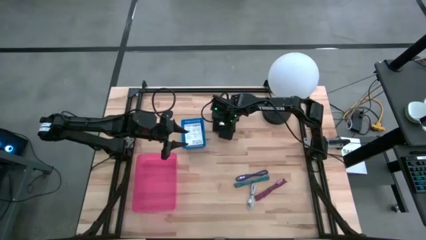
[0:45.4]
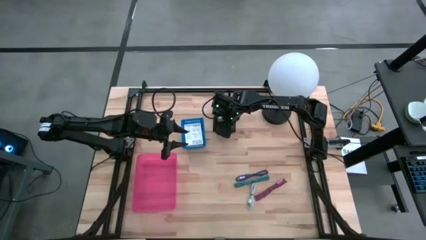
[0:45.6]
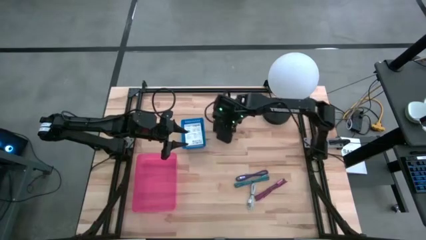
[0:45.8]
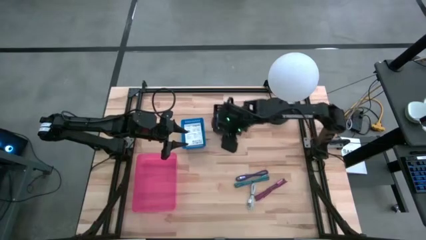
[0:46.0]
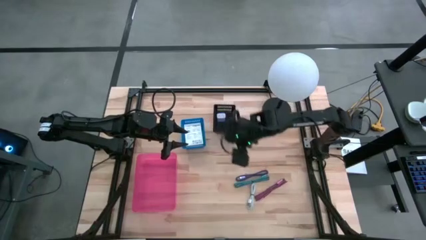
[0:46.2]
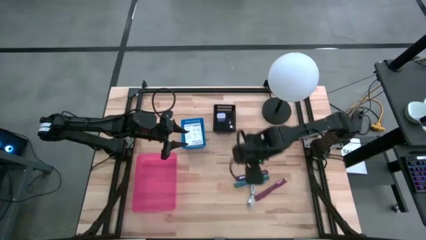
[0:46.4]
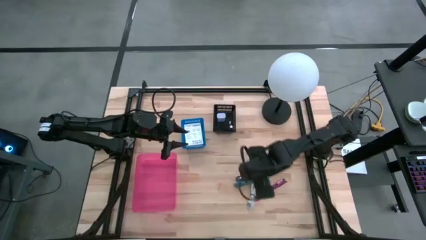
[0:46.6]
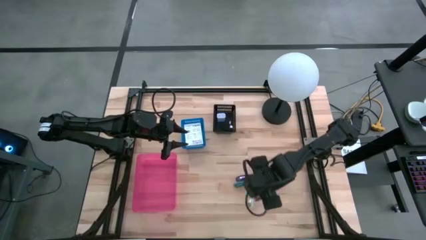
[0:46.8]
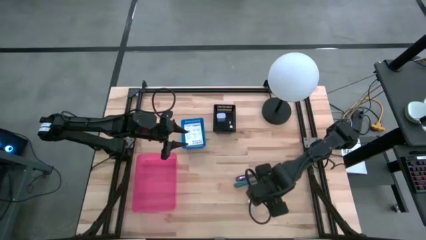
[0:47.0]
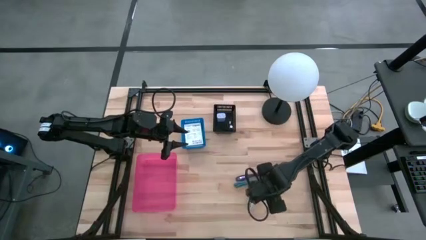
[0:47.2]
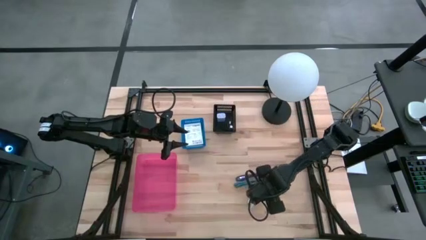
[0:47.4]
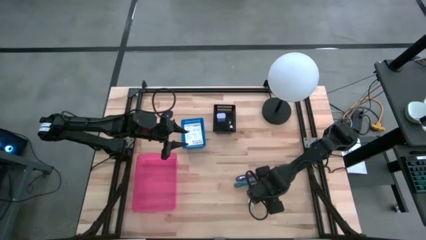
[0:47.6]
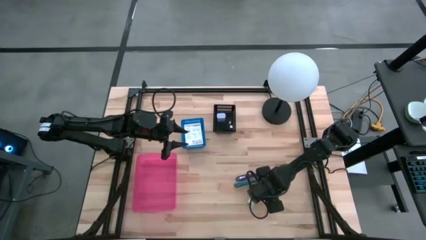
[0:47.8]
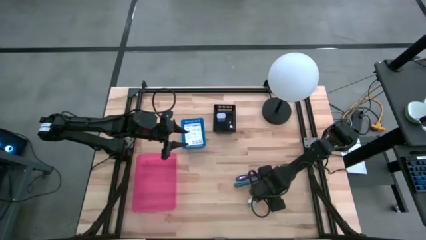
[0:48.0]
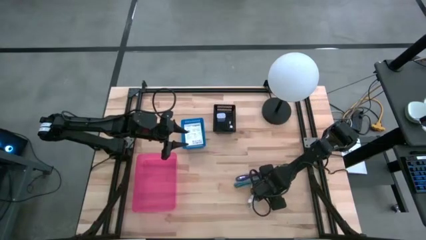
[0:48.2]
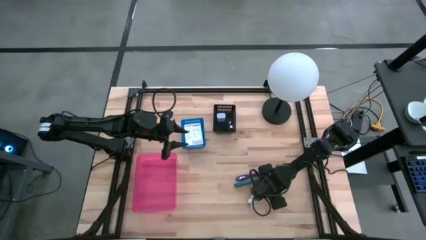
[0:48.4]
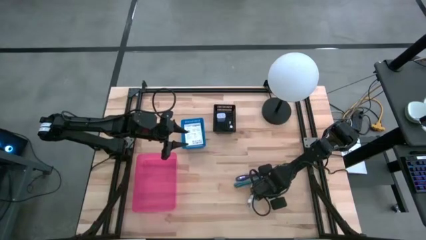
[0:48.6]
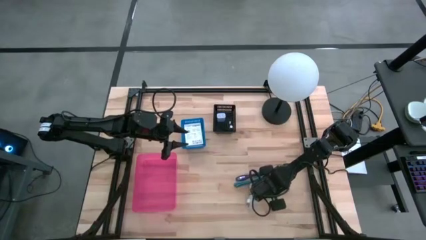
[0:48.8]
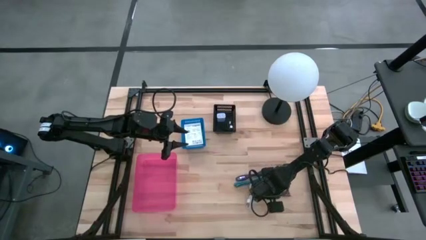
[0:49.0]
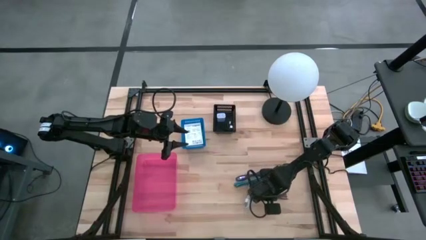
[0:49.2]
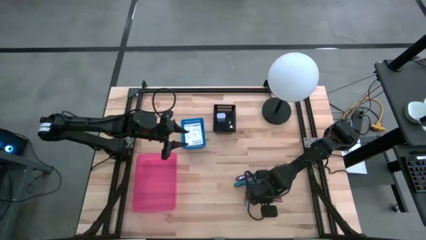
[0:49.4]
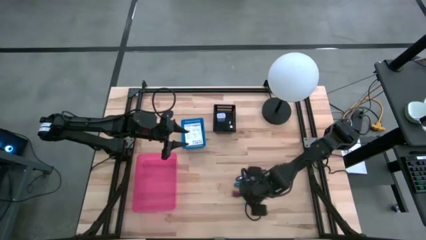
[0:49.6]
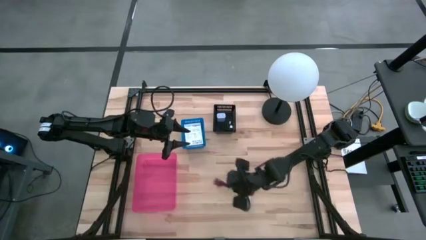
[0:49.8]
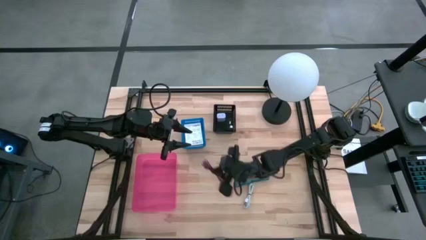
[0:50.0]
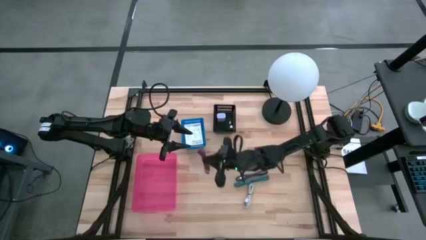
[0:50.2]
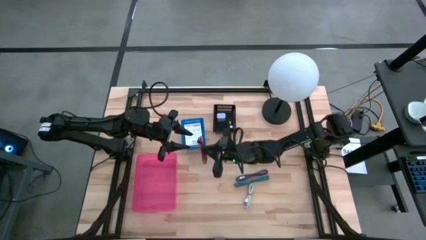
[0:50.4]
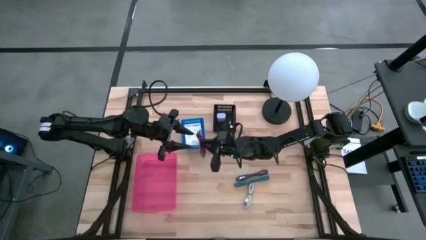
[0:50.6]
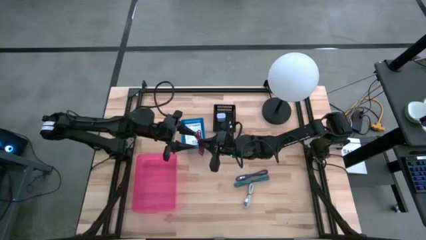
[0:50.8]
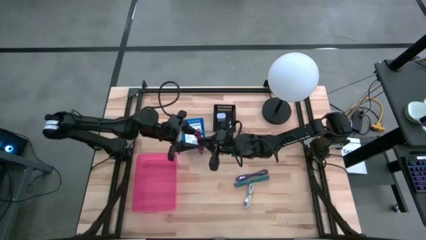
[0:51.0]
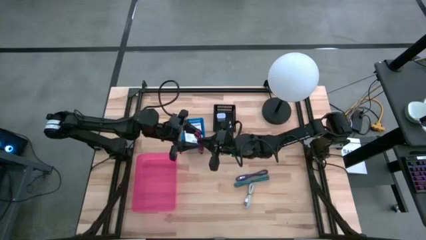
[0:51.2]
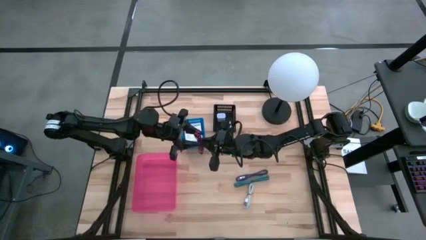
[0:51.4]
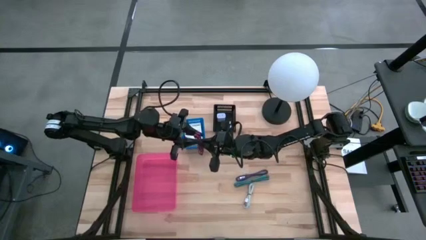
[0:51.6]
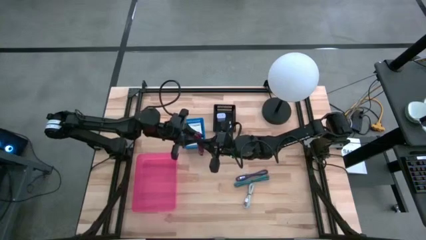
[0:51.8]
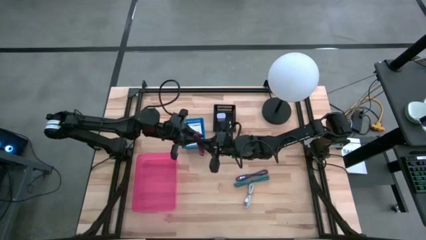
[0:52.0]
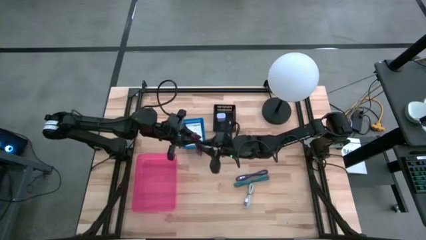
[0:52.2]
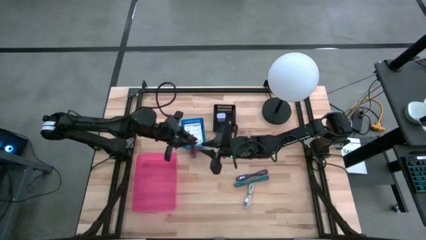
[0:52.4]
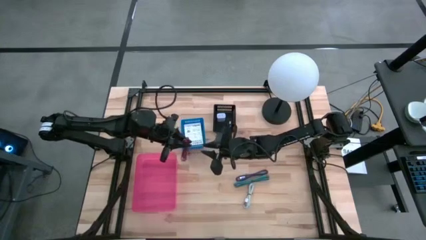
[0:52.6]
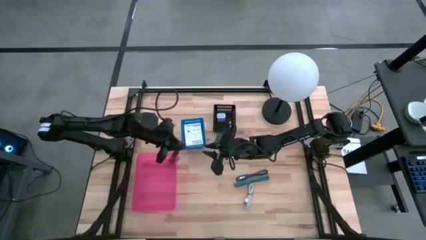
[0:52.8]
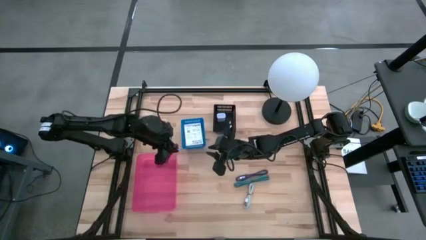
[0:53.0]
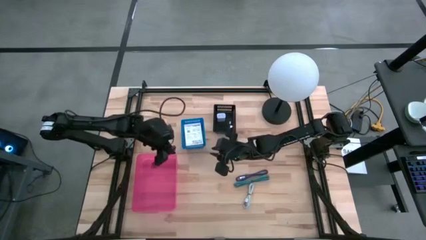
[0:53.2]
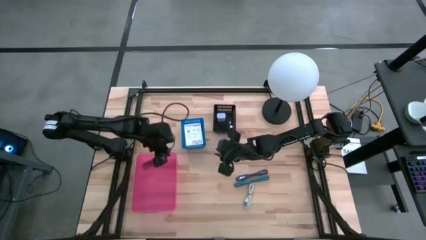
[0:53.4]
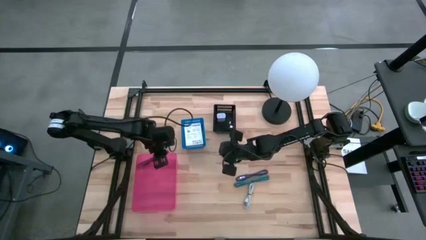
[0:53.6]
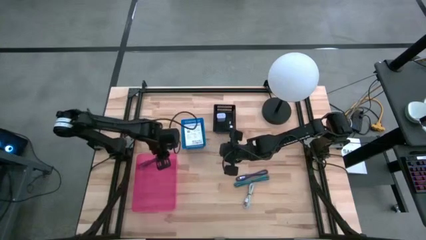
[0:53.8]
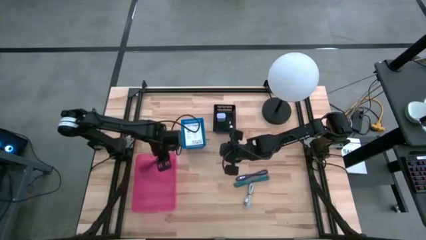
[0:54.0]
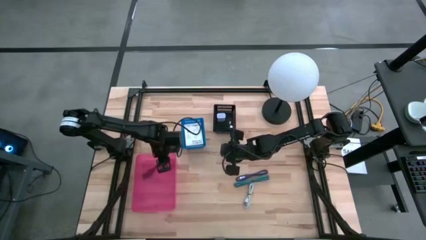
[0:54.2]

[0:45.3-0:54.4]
Task: Pick and place items into bin
Put the pink charger cable into the pink bin

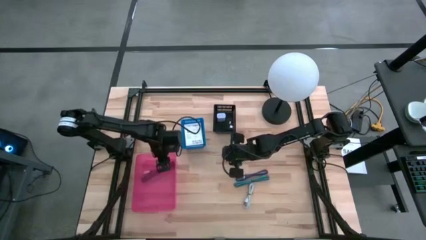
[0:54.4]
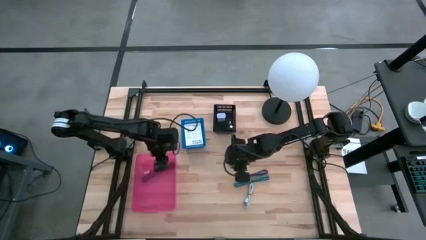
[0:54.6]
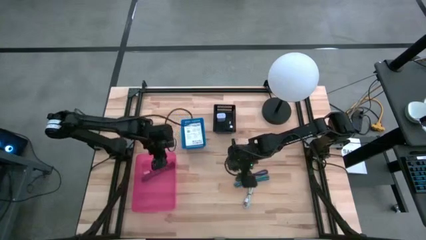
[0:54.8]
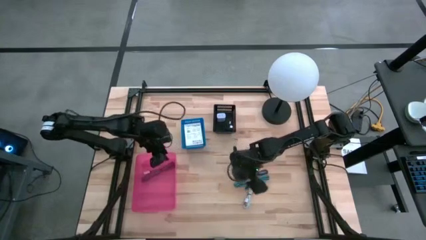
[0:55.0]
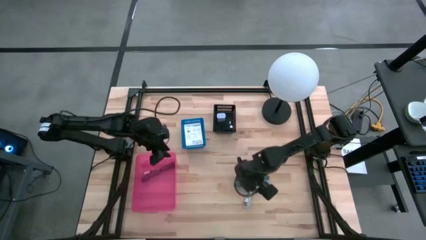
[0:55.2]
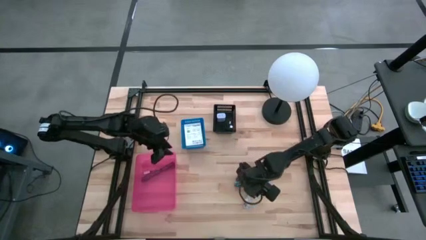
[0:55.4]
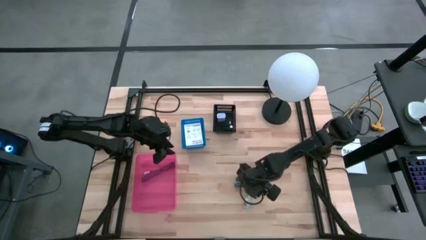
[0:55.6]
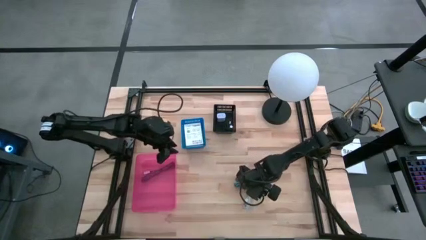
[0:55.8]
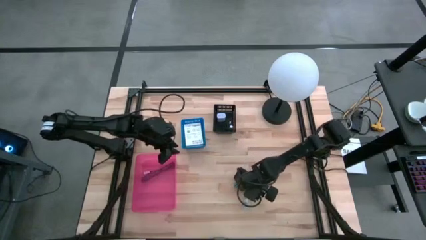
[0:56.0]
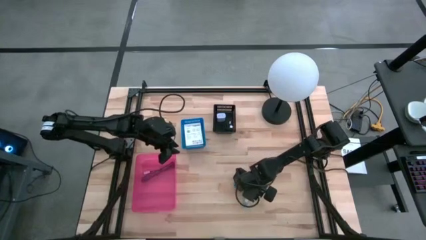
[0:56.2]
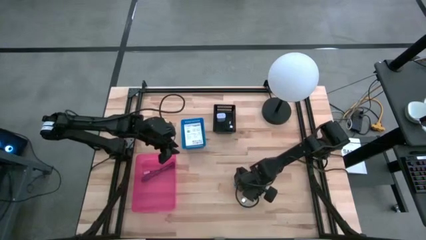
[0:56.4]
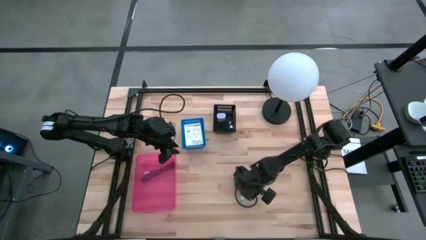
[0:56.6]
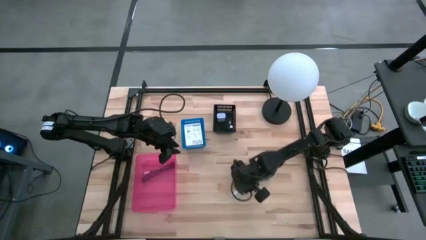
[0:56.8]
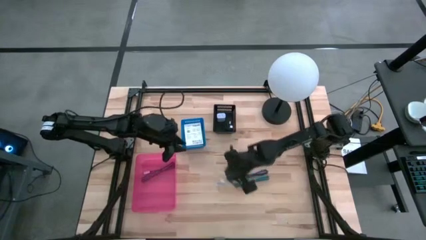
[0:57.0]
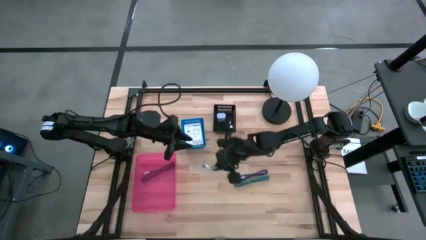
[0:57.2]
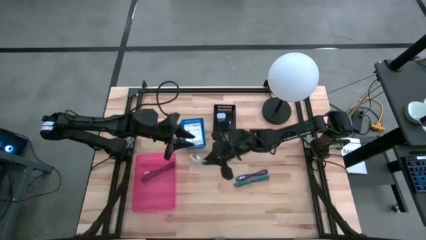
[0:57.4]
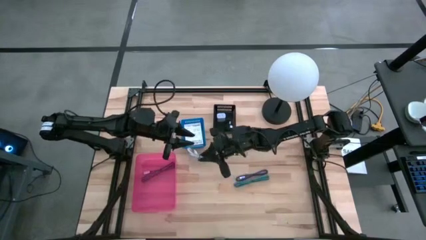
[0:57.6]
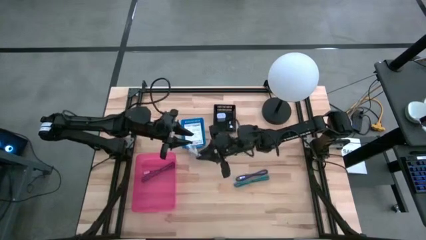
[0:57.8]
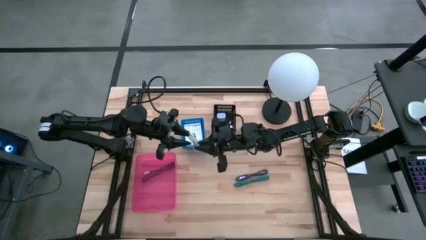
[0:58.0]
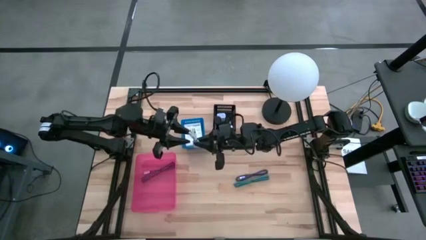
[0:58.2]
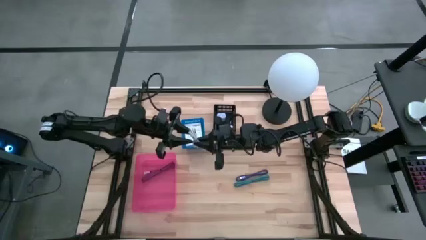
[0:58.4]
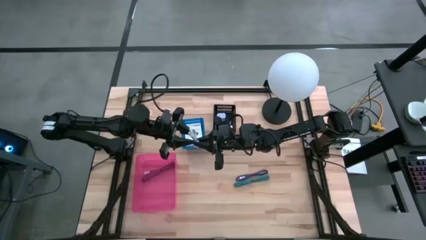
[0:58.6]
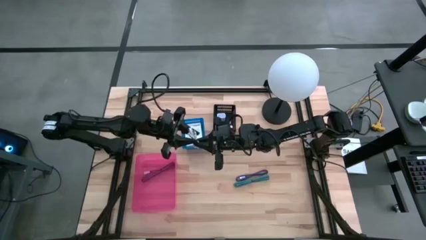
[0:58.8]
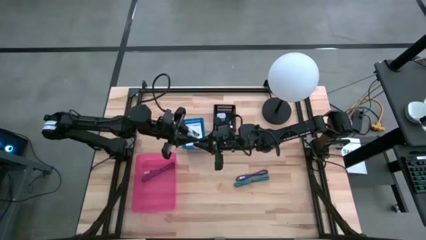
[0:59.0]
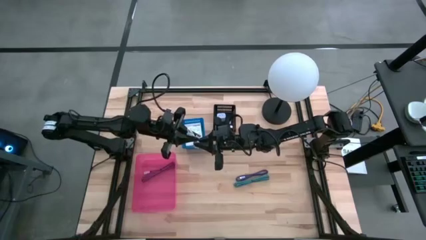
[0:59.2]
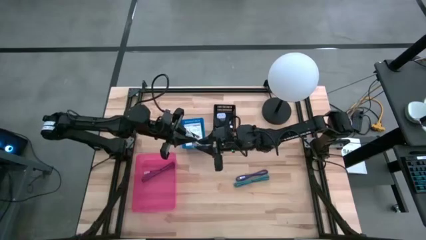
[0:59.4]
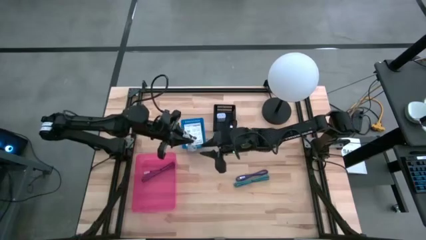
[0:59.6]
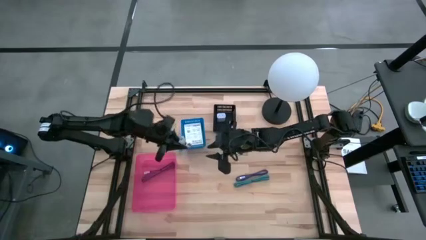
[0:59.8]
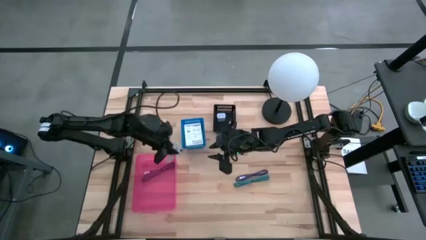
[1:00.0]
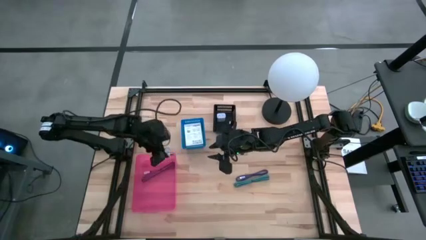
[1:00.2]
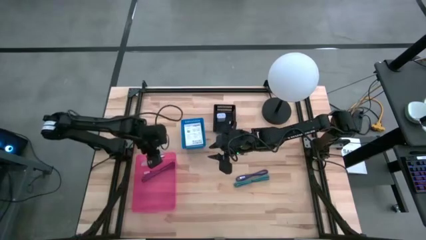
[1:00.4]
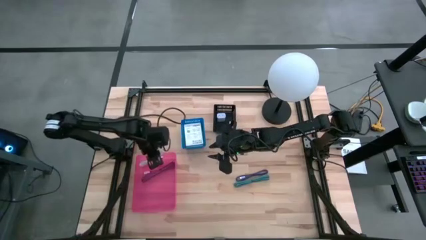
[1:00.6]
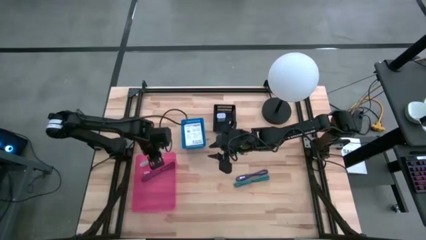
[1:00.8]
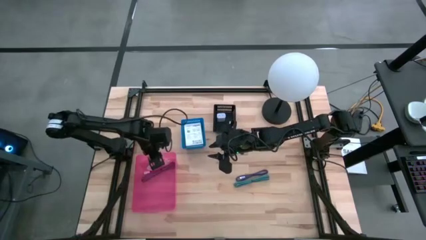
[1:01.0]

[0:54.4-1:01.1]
Put the white charger cable into the pink bin
